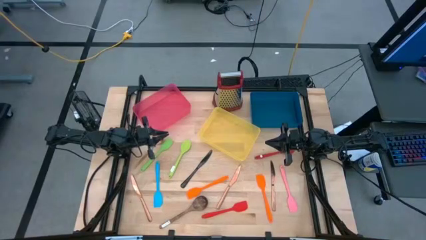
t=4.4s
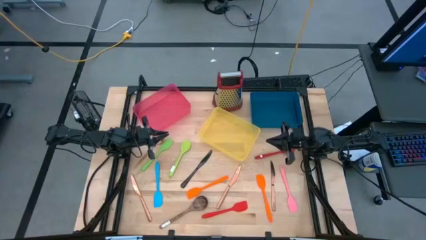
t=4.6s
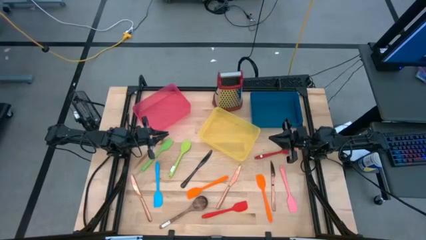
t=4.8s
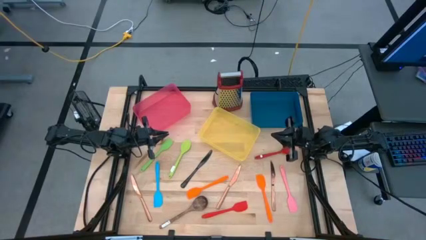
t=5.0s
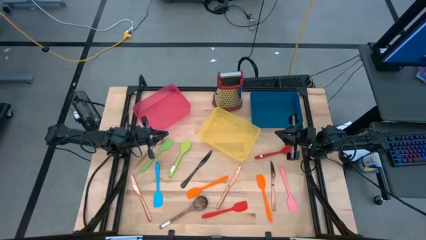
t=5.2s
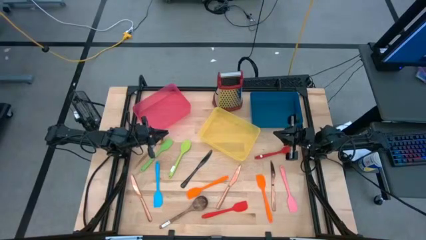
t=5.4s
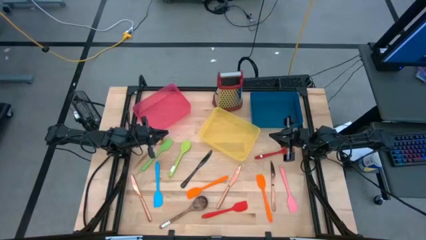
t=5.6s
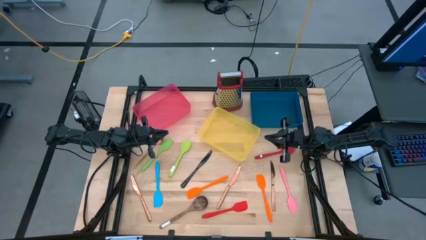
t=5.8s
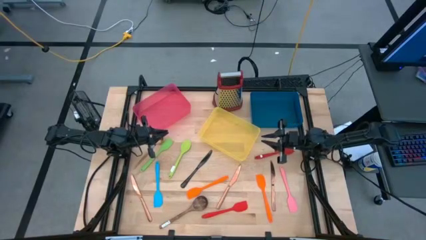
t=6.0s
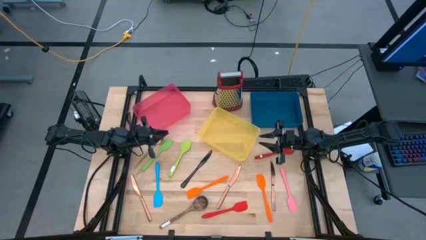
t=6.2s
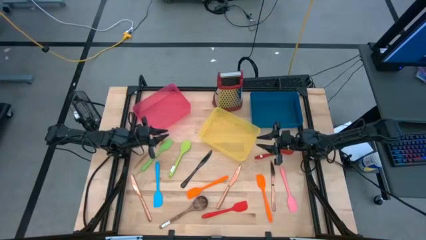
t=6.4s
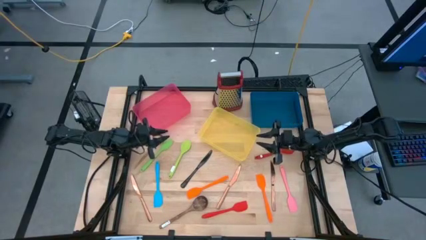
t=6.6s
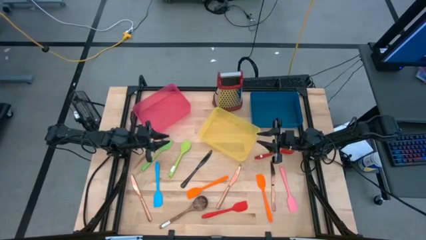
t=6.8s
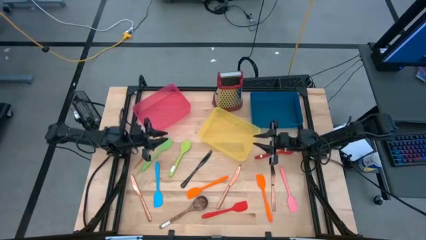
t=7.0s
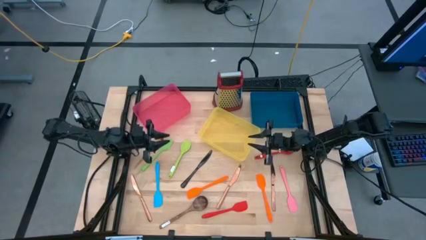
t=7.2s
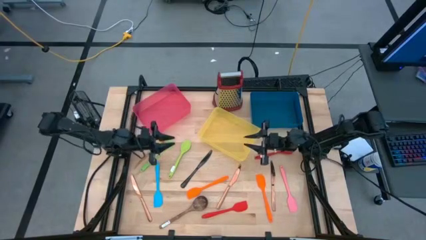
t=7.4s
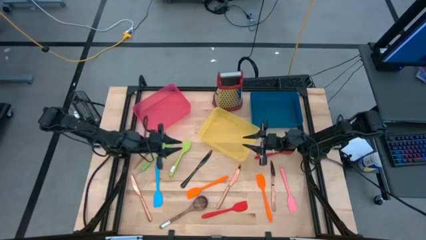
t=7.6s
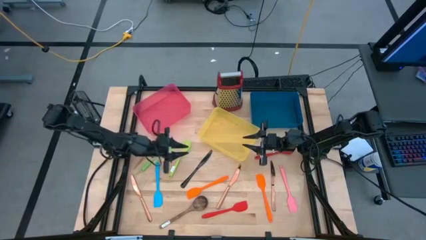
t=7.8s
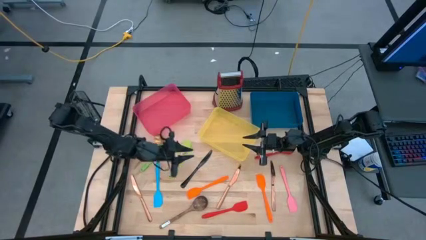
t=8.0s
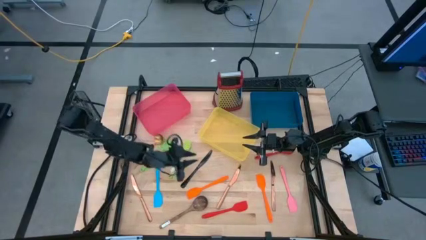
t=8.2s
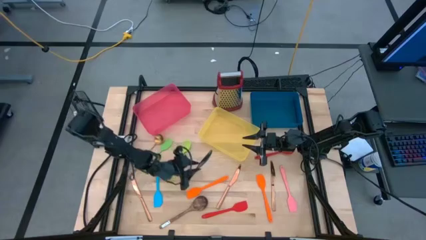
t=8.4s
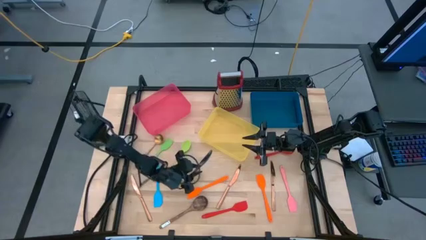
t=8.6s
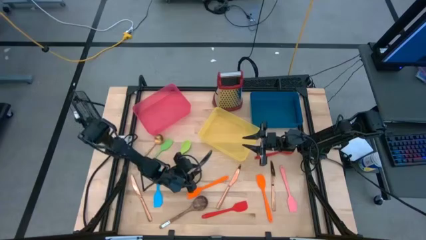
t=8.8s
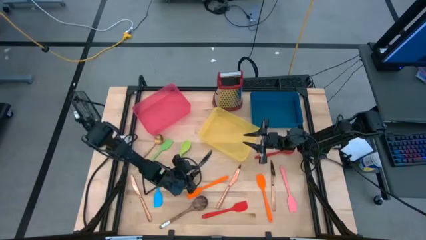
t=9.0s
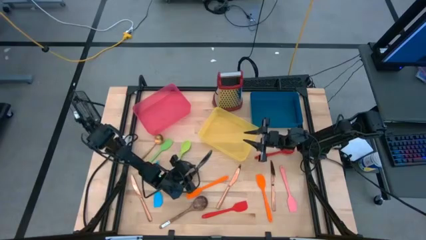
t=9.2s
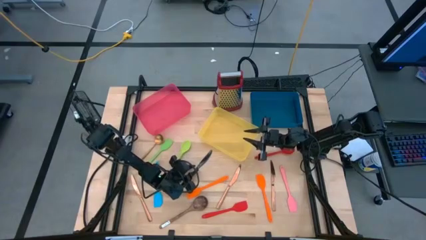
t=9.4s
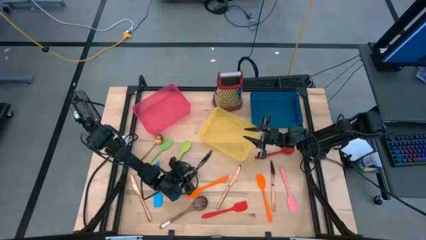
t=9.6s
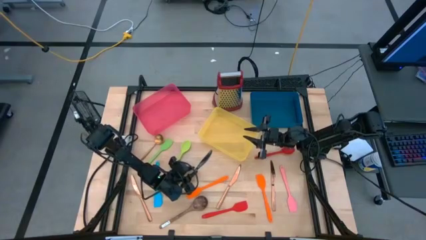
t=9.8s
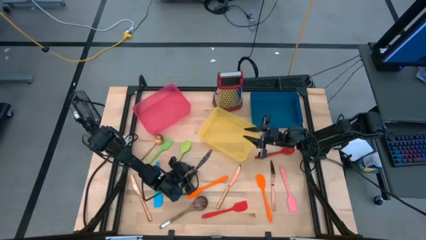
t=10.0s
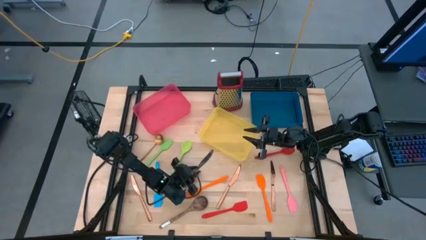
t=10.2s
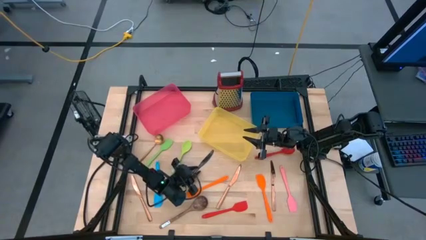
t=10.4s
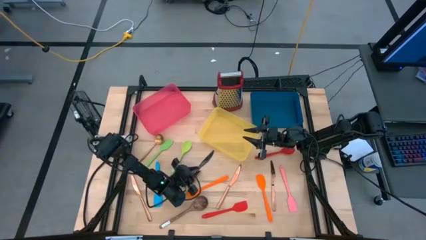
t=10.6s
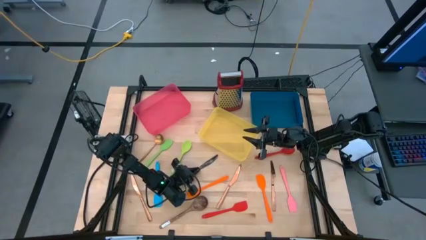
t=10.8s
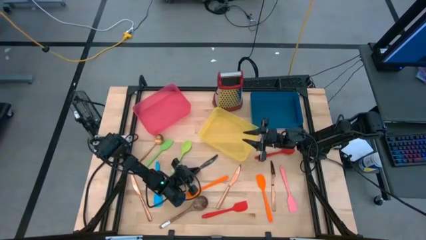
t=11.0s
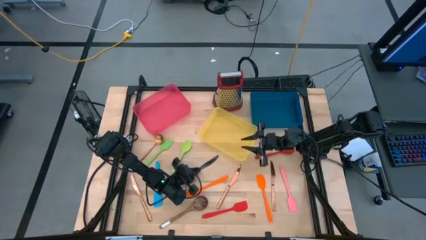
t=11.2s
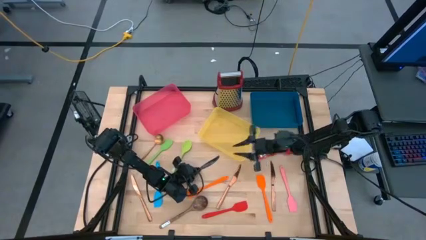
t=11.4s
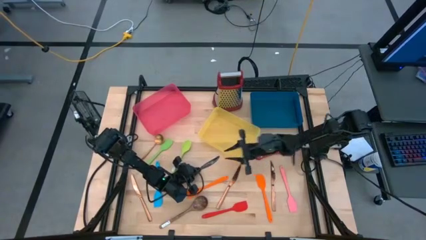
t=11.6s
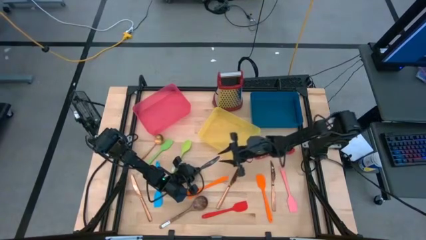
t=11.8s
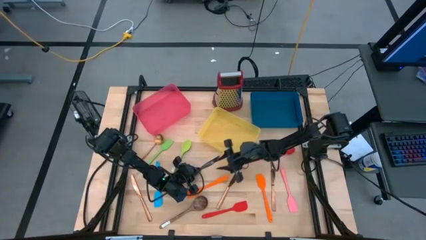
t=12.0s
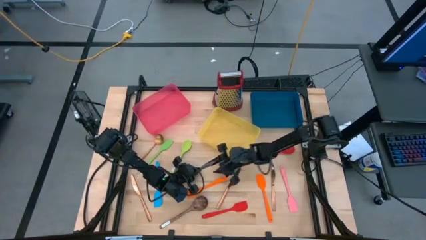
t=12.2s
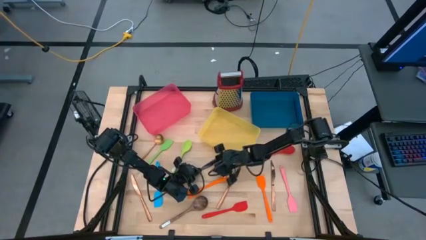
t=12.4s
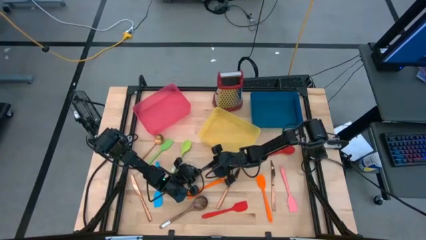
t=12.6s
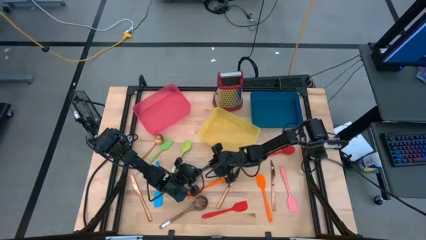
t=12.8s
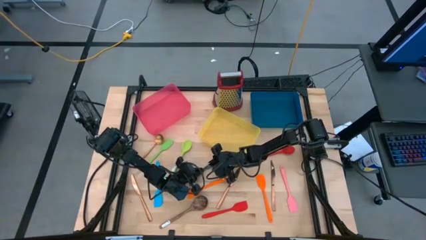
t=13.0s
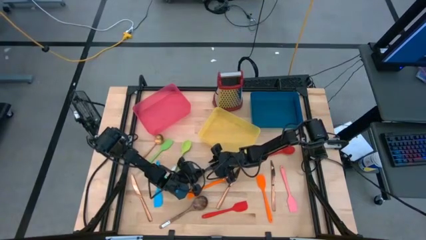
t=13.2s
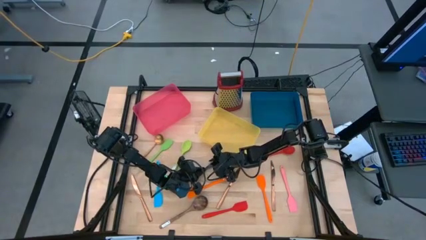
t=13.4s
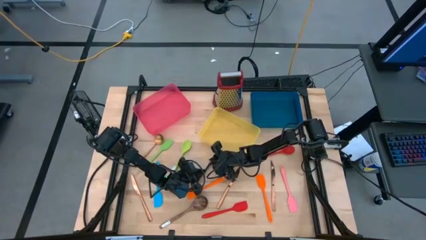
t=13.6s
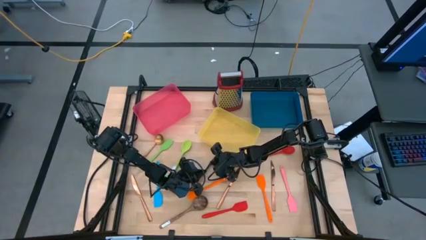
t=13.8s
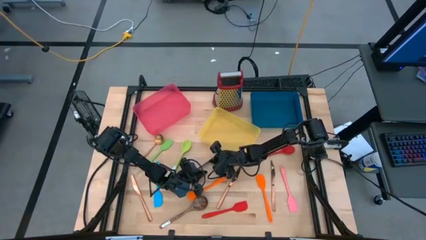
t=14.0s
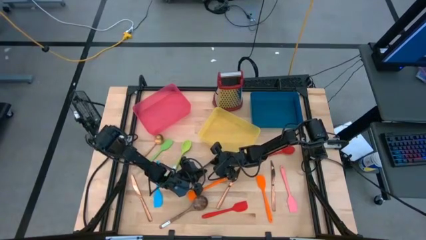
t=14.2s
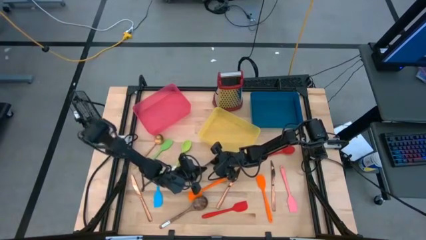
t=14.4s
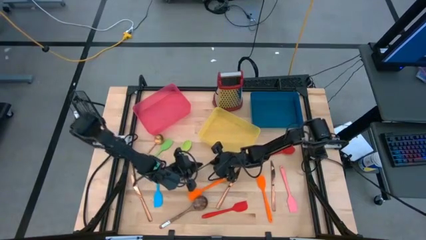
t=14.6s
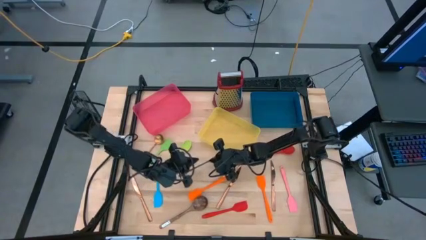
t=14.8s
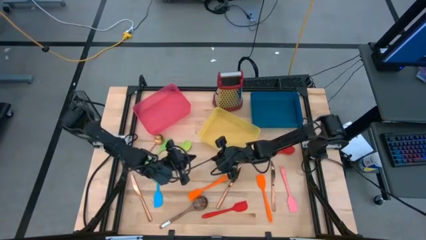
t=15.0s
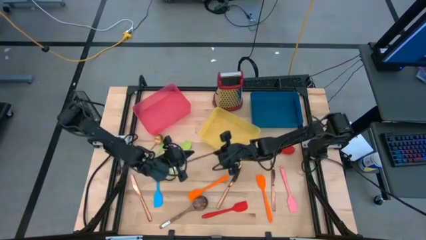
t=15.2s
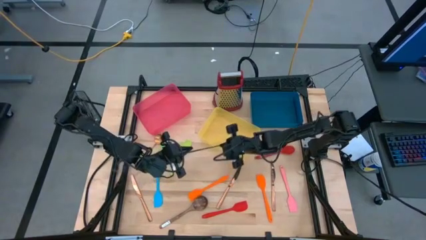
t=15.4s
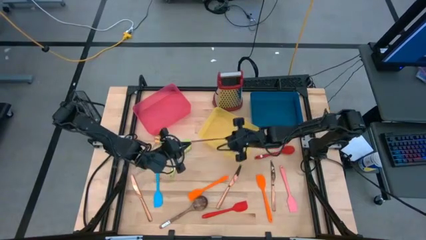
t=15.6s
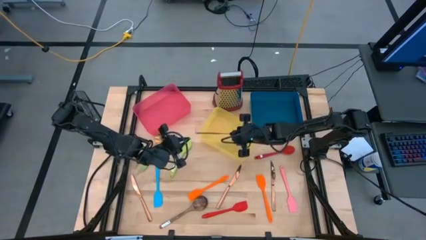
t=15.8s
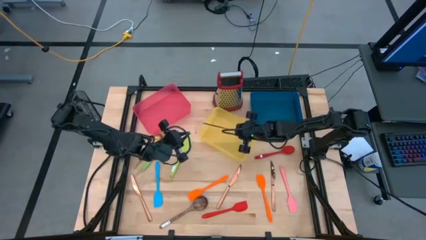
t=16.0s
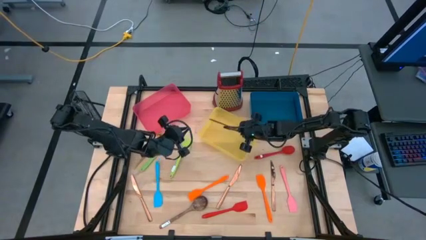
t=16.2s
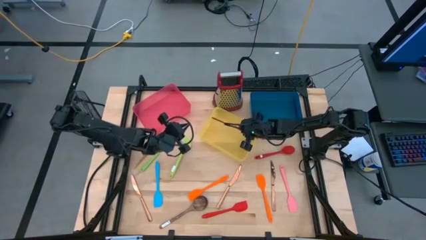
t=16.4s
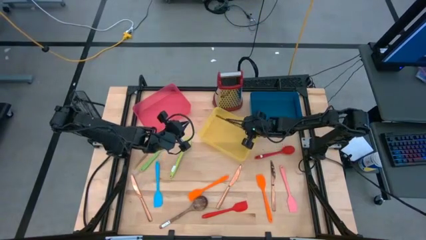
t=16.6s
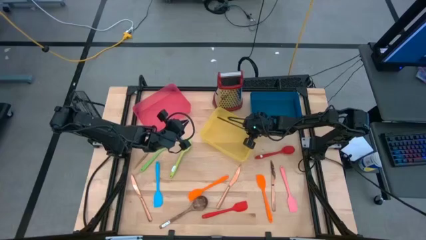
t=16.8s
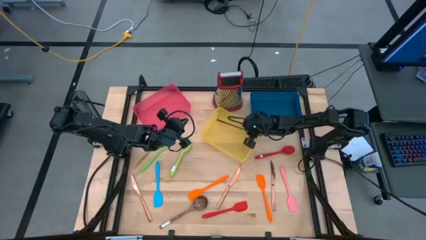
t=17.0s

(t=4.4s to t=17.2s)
Task: Pick & Place Kitchen Items
Put the black table knife into the yellow bin
